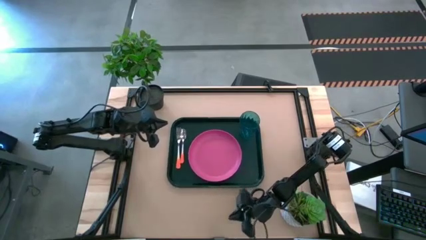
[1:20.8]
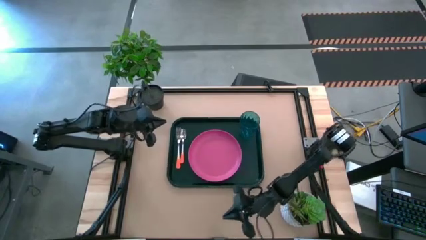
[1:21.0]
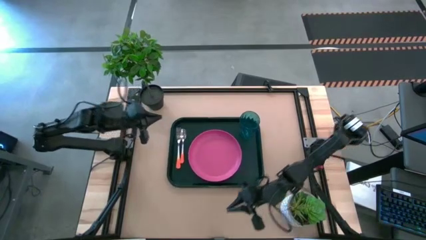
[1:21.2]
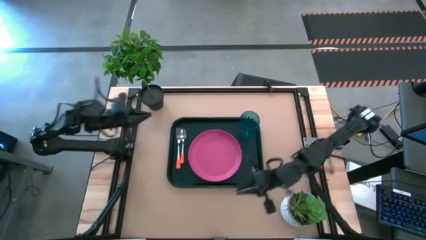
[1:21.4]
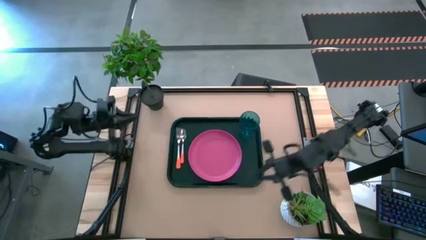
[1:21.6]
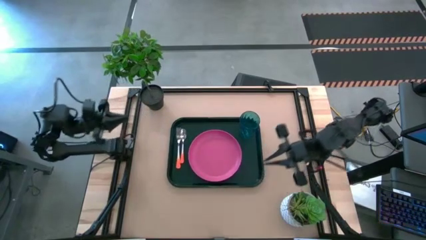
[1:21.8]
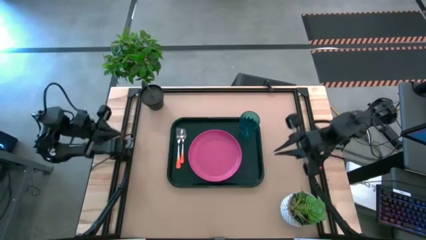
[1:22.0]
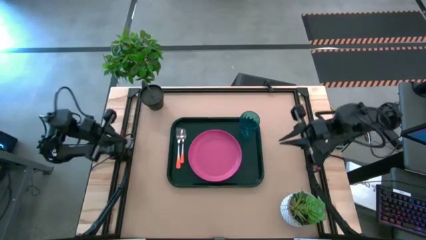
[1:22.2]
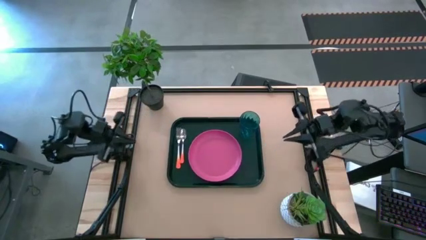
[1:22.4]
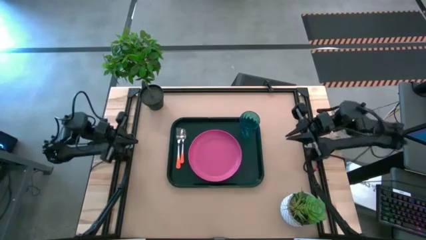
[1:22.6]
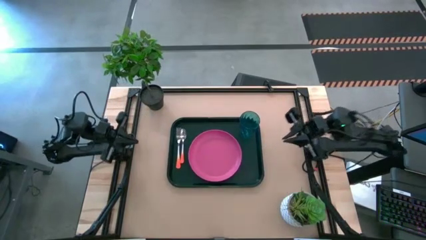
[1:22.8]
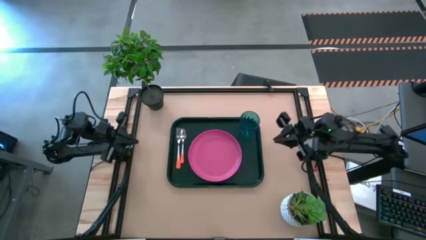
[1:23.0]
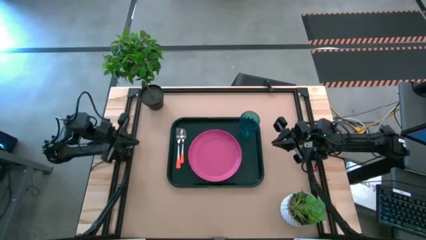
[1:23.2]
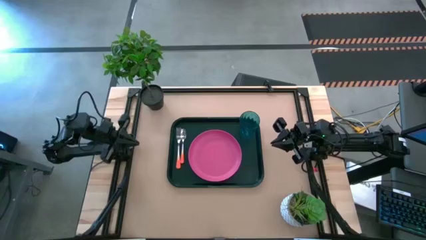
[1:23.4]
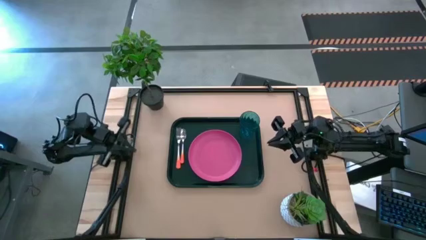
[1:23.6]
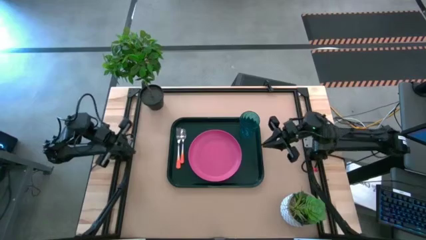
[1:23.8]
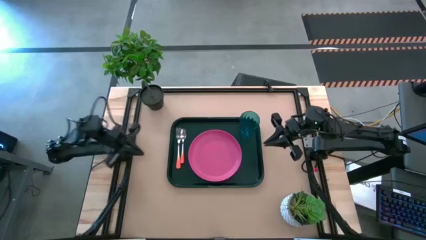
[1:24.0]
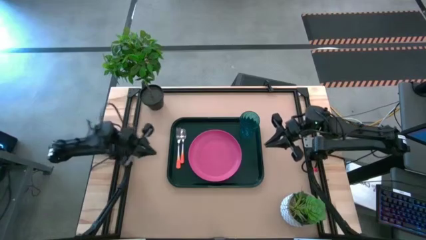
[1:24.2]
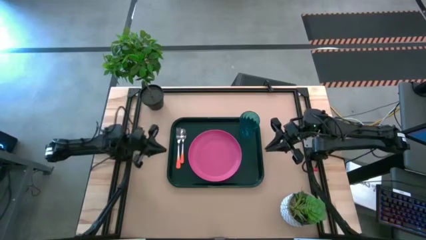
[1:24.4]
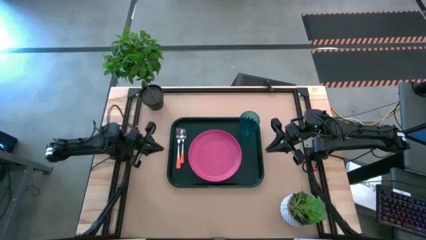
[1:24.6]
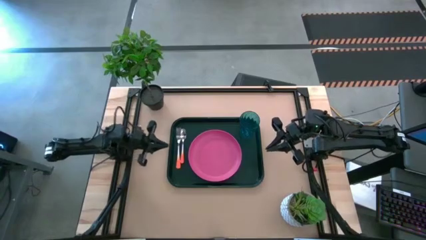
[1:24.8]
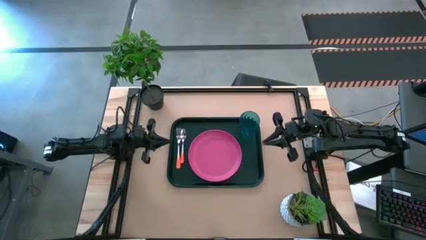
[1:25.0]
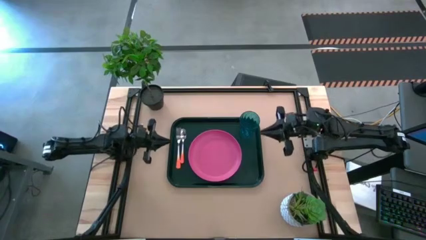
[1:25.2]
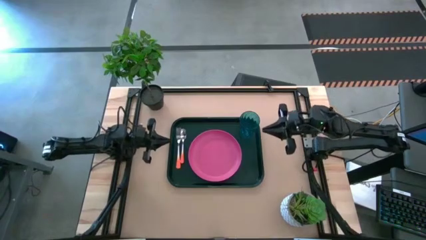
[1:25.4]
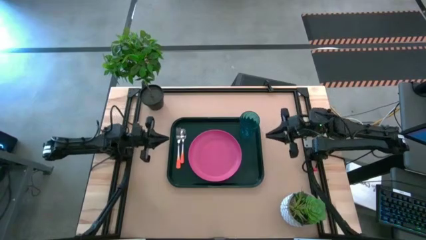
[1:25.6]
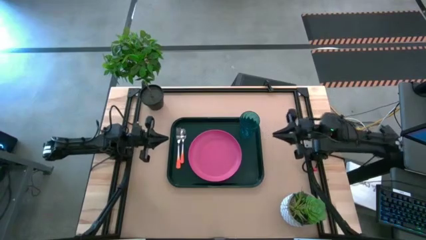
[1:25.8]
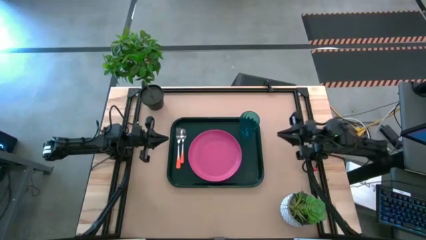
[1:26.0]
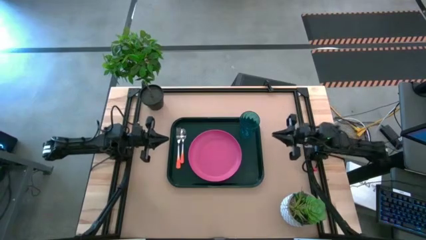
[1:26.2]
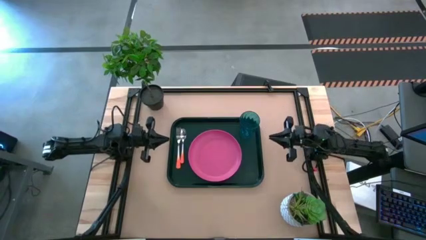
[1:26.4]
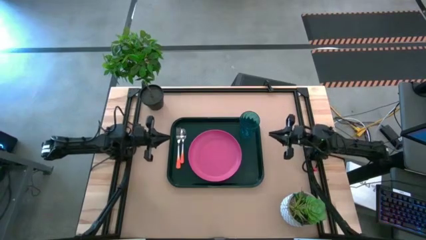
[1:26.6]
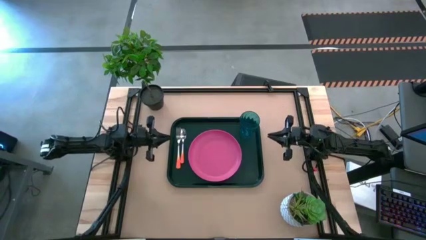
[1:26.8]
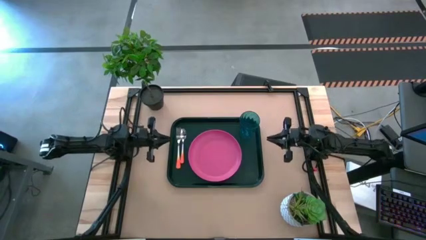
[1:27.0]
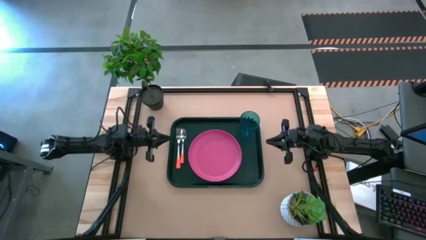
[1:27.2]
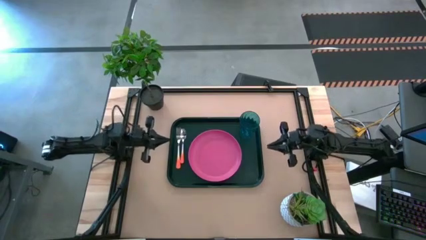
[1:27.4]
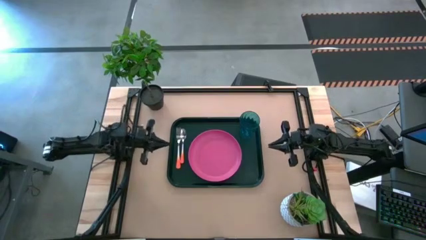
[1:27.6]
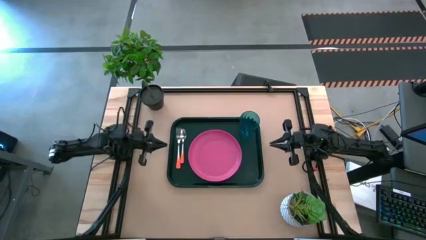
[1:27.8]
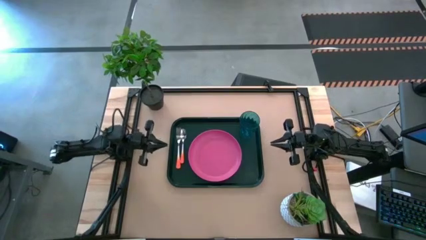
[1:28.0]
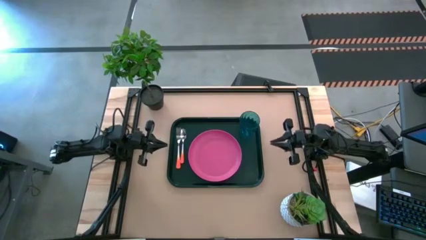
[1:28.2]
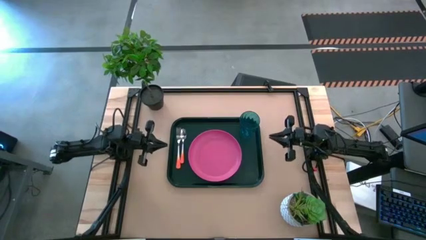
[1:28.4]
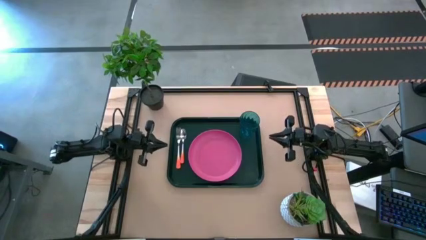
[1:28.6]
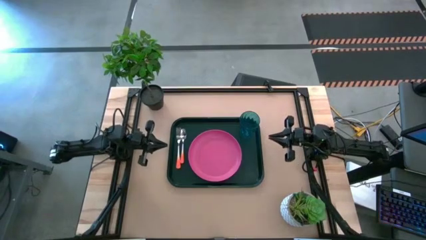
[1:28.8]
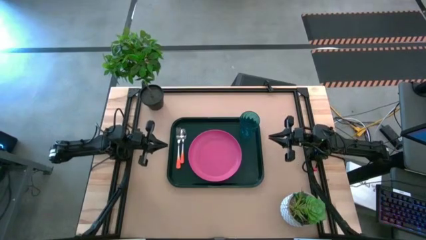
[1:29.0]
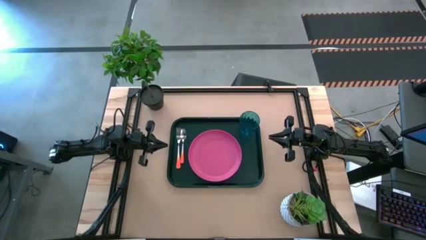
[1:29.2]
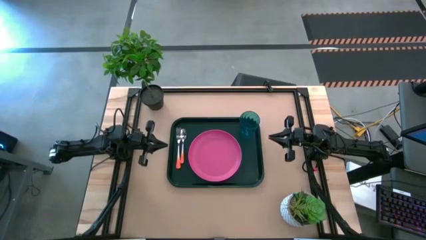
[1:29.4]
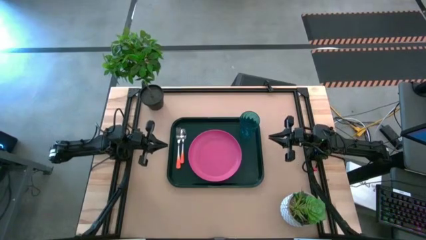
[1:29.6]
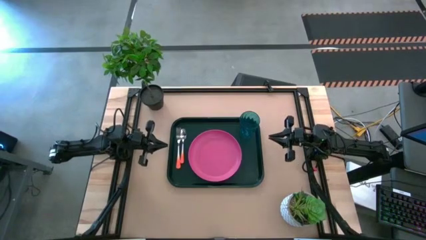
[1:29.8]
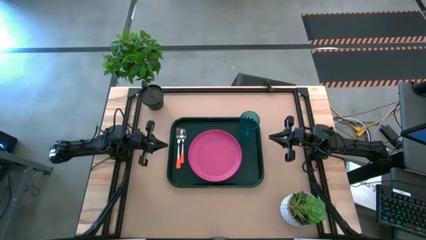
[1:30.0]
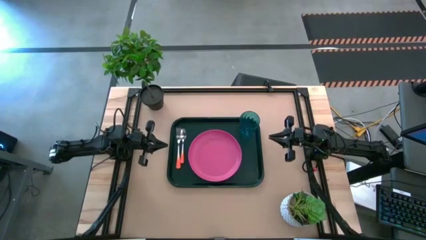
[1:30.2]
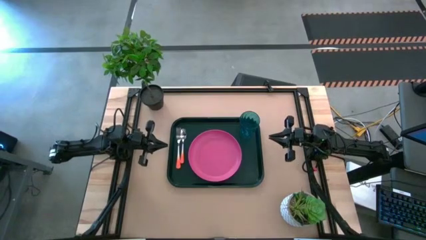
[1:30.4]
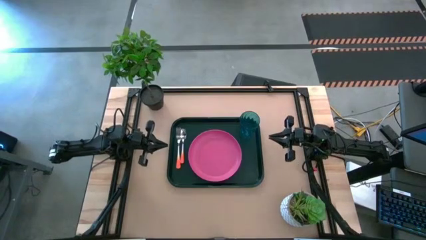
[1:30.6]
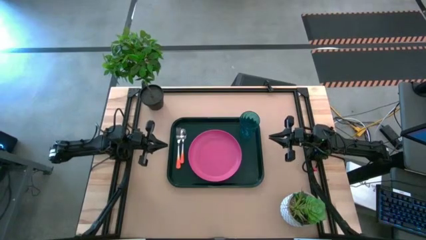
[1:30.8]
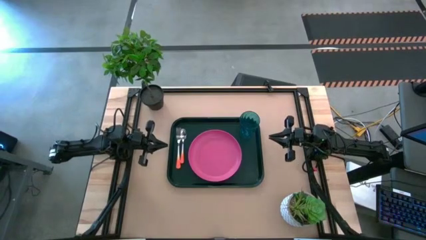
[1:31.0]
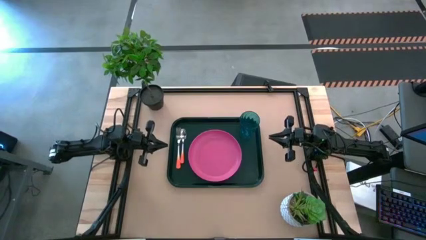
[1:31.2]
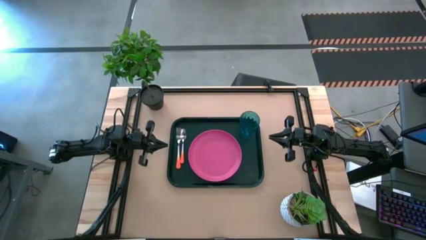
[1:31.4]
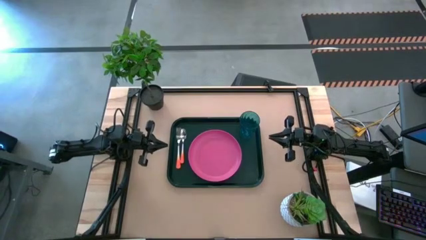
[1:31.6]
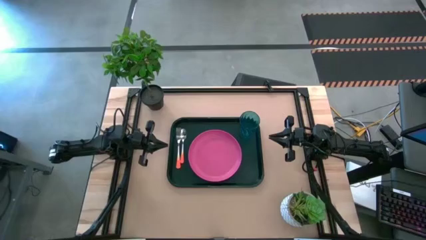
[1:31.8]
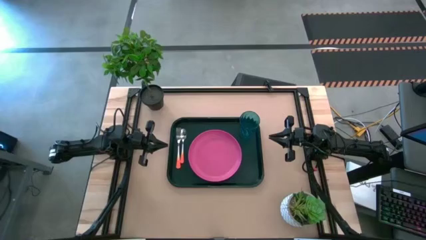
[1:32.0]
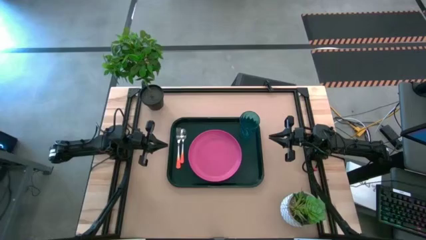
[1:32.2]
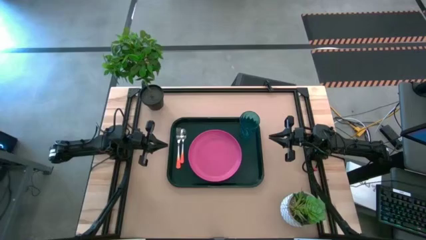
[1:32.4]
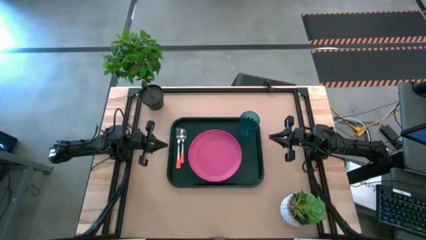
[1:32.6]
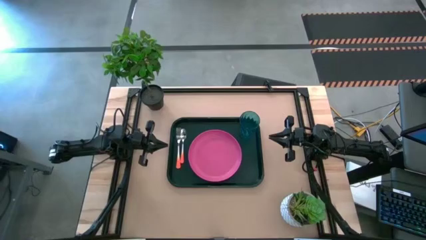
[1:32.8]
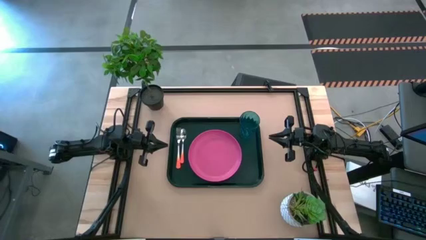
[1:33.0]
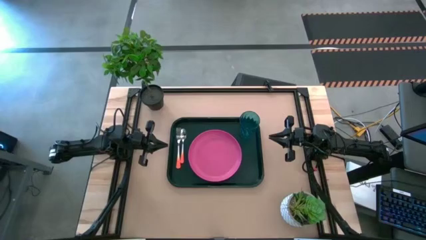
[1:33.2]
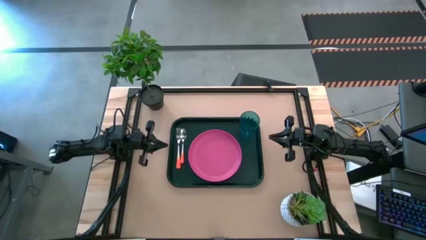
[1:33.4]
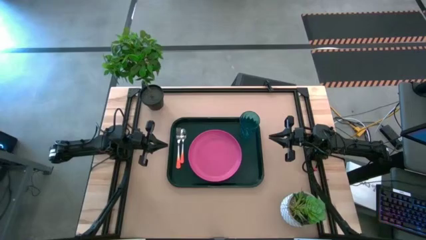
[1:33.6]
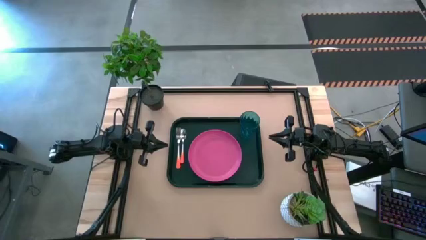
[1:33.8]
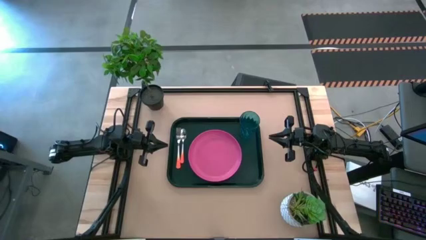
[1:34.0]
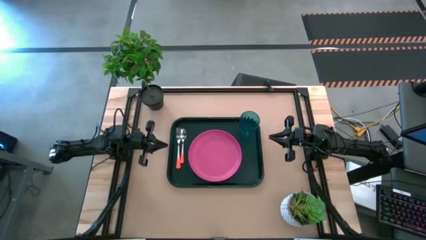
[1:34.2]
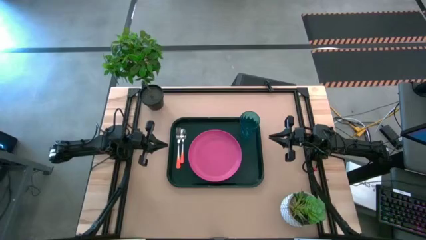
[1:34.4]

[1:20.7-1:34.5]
Task: Pick and place plate/cup/fork/spoon on tray
Return to Home Position
